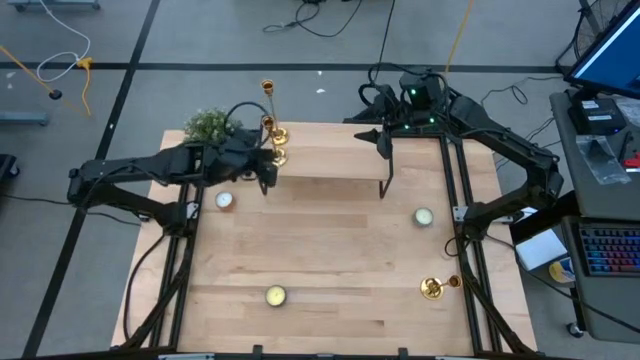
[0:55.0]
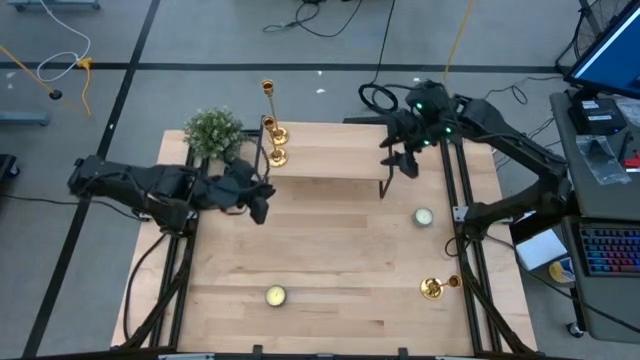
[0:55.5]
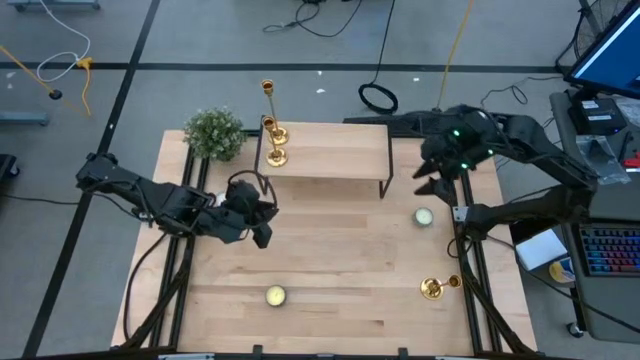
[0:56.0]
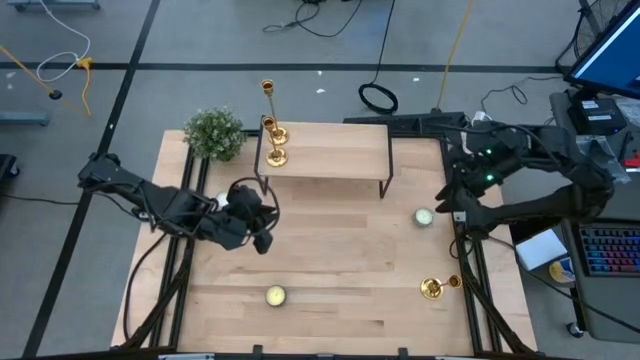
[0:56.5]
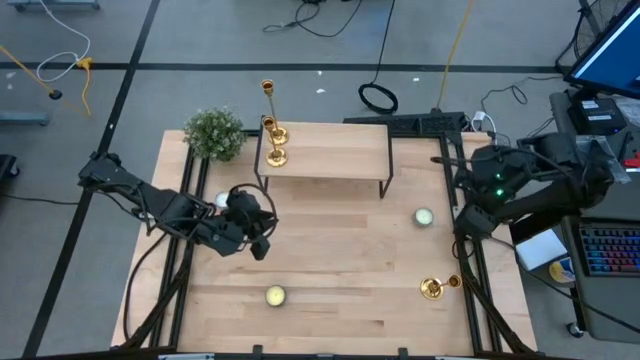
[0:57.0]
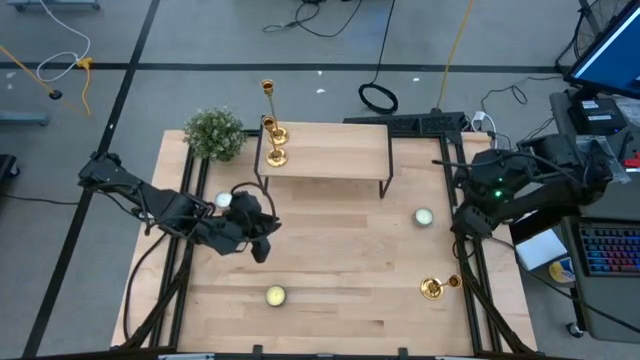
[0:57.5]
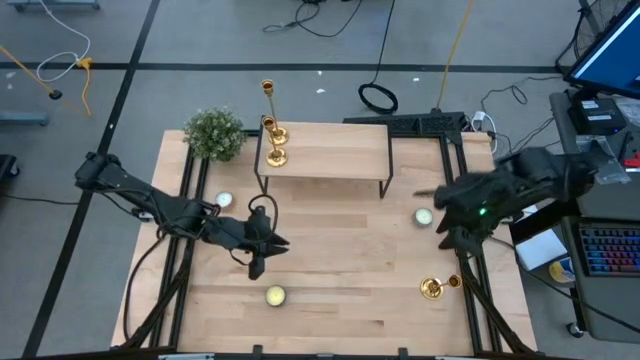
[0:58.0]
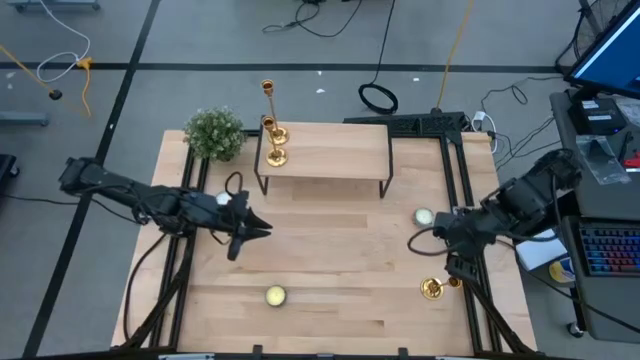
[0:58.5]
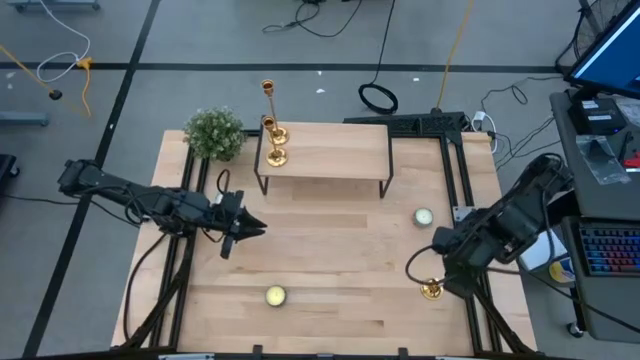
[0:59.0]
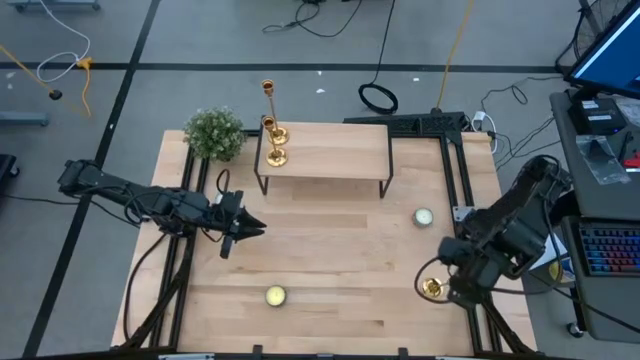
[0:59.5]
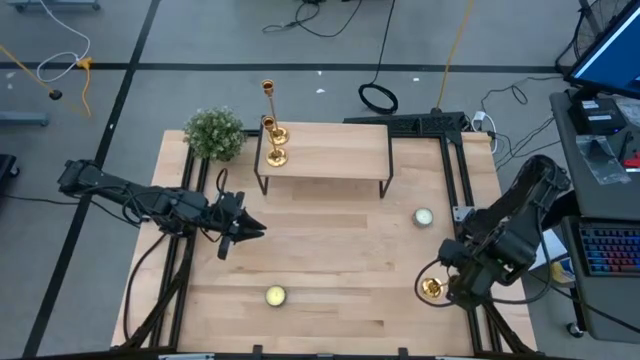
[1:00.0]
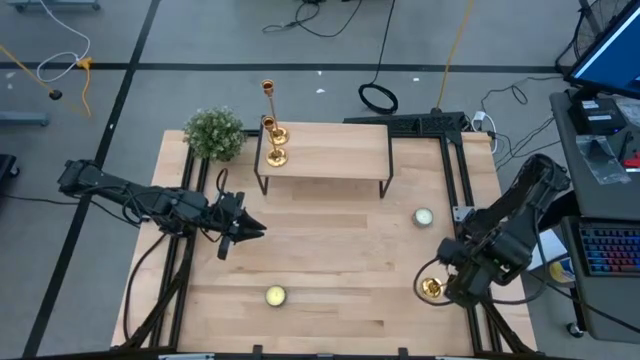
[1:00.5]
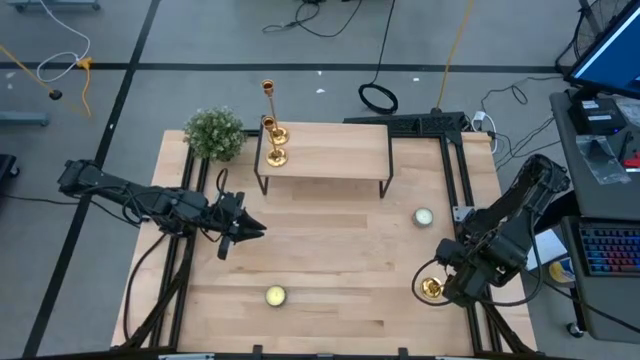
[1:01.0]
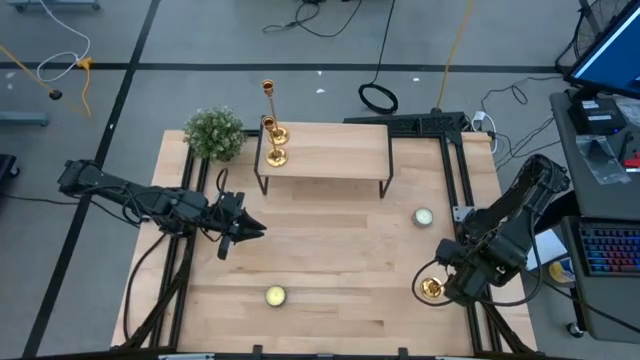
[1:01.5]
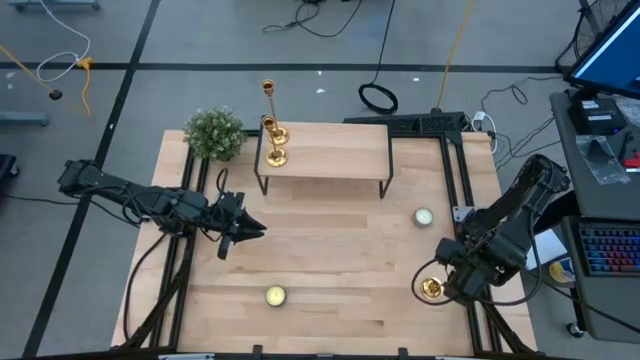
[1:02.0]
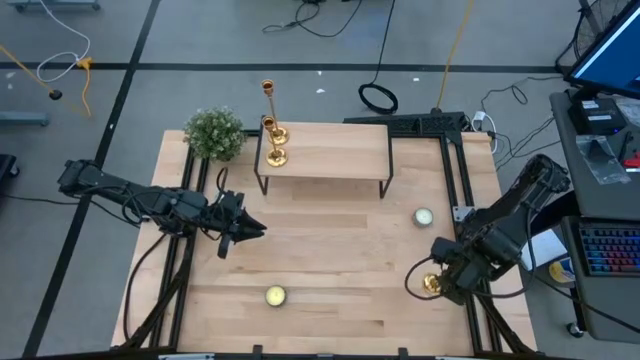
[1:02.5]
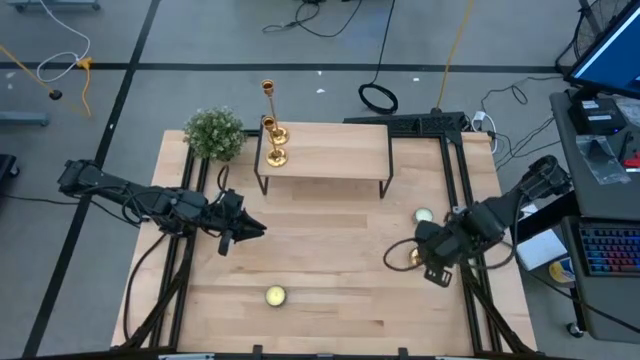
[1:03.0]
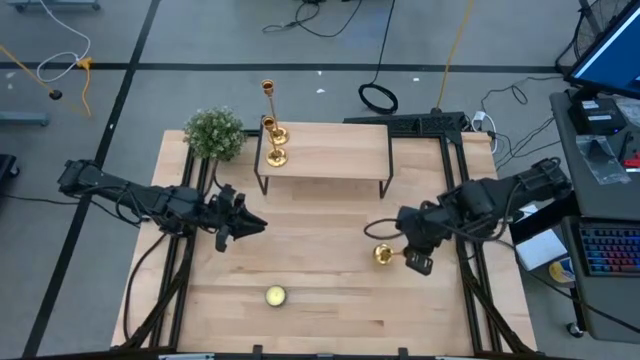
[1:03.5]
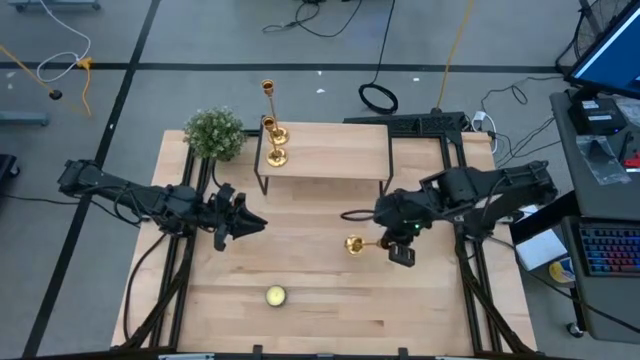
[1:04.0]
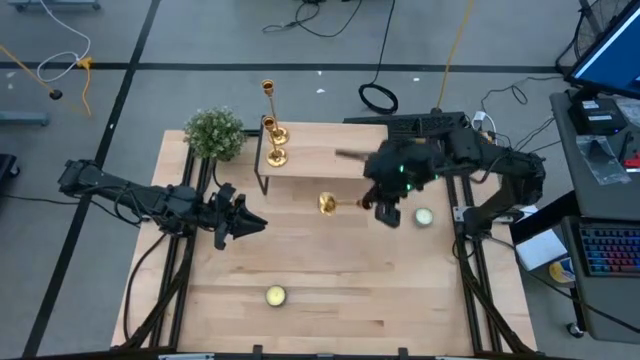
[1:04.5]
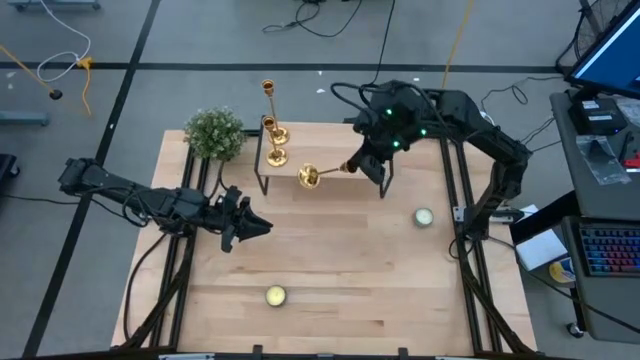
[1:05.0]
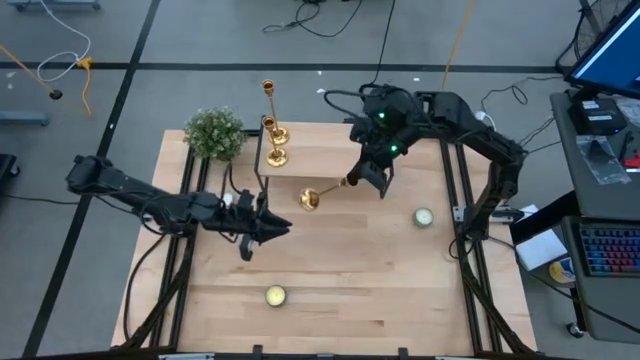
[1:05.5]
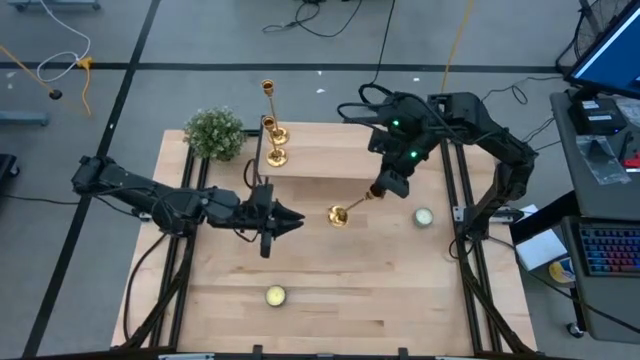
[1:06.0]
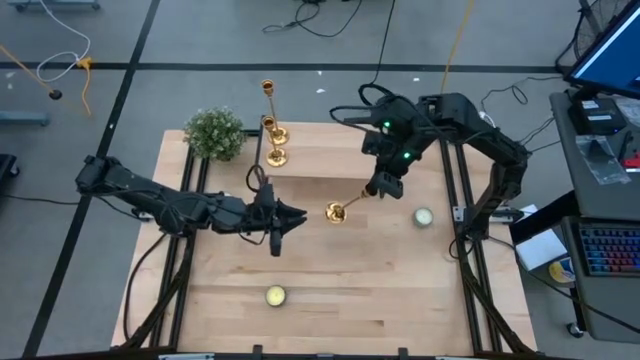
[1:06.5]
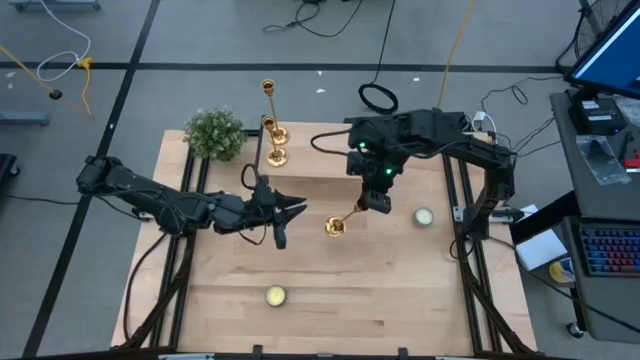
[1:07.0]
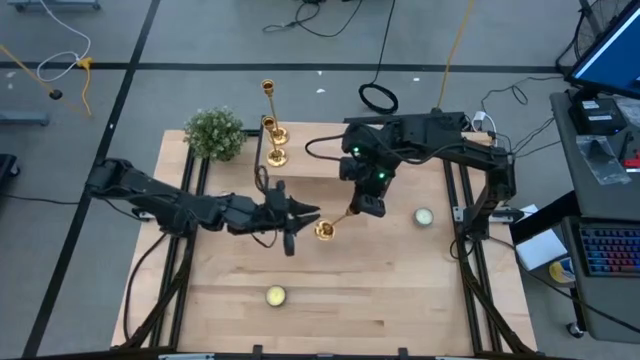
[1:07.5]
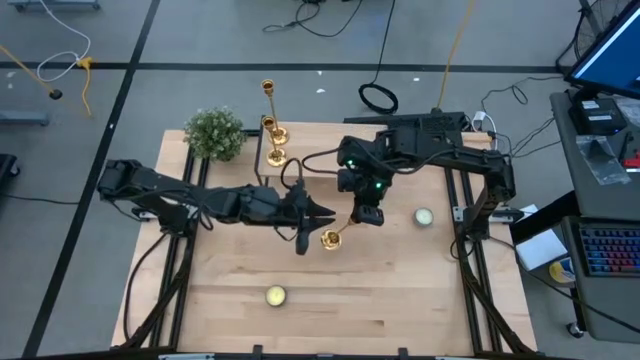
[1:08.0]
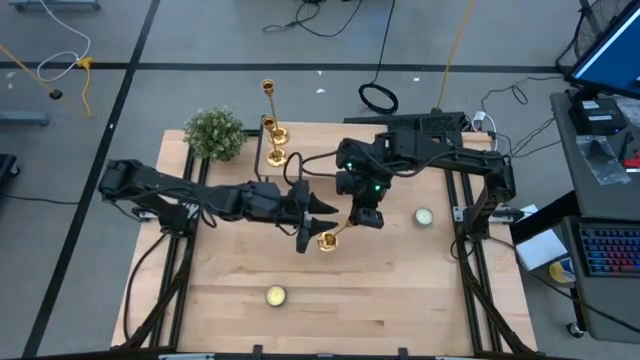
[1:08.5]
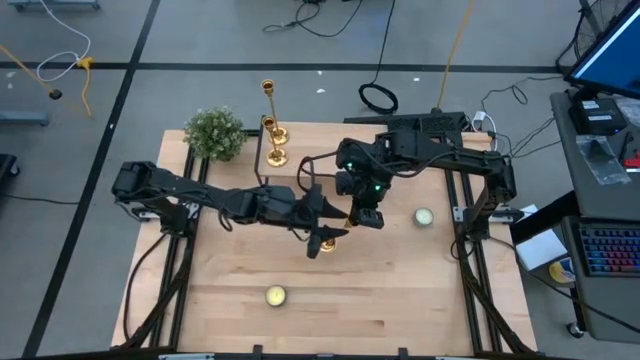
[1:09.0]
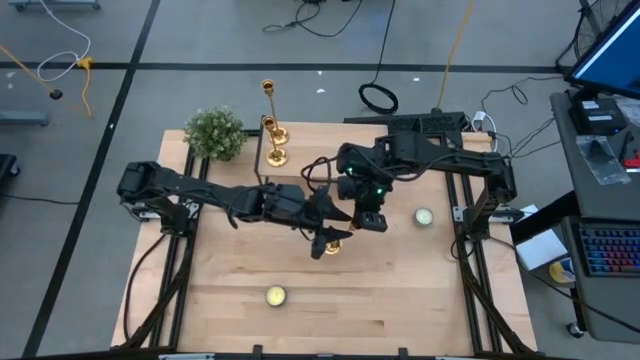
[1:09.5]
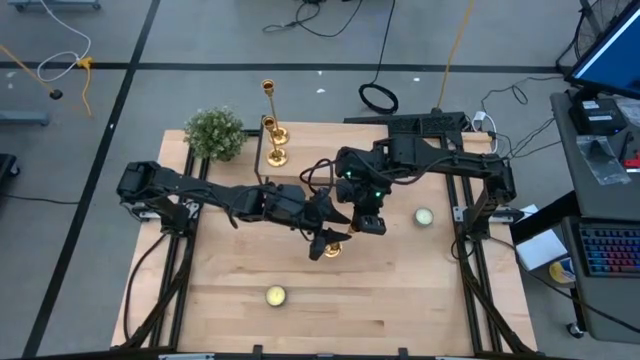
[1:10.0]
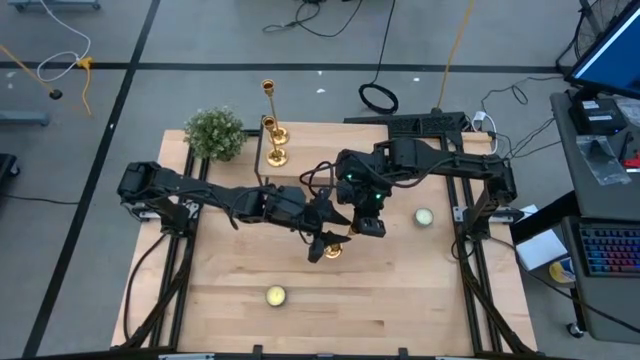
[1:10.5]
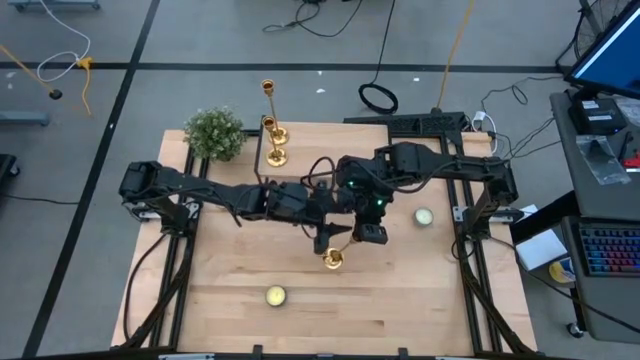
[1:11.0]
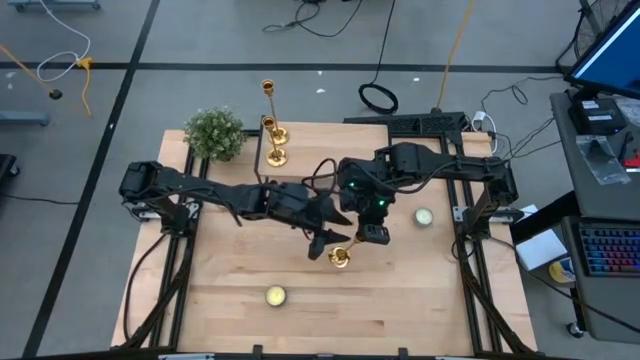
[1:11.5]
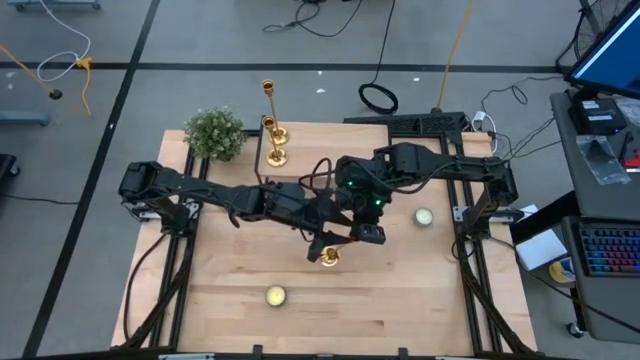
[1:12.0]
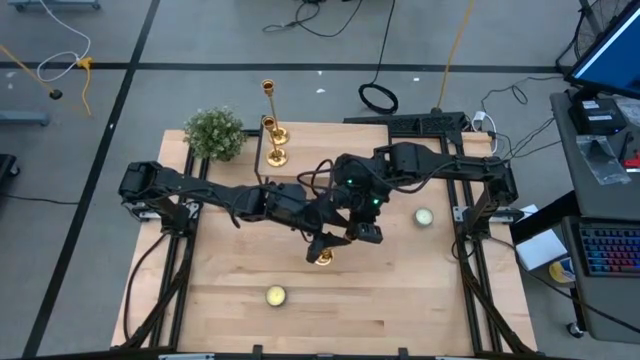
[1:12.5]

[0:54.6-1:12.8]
Task: Pick & Place candle stick holders
Put the gold candle holder on the shelf

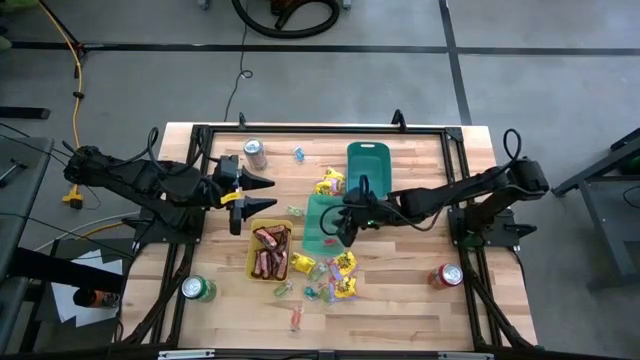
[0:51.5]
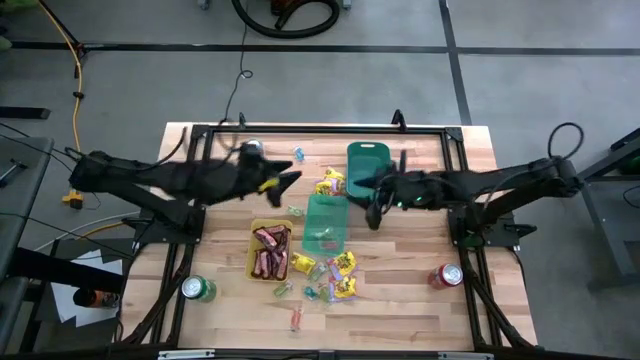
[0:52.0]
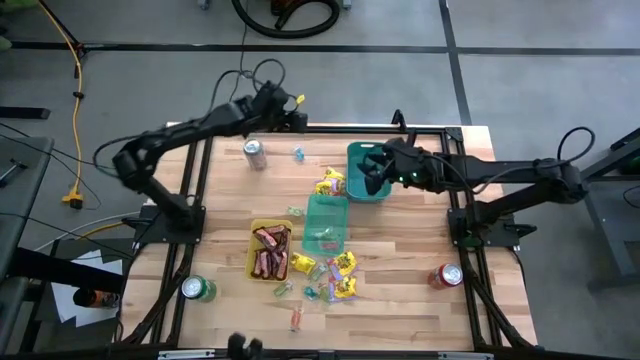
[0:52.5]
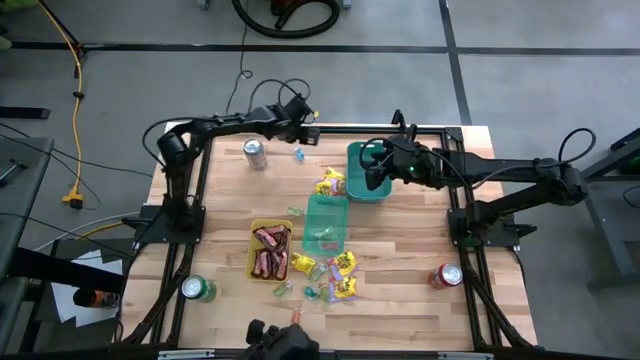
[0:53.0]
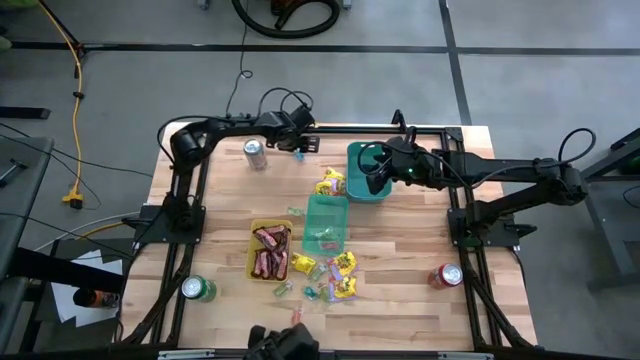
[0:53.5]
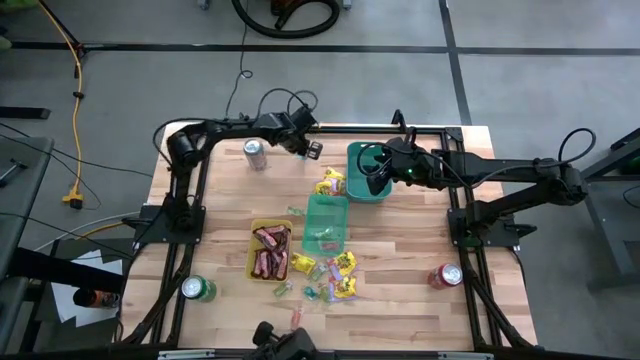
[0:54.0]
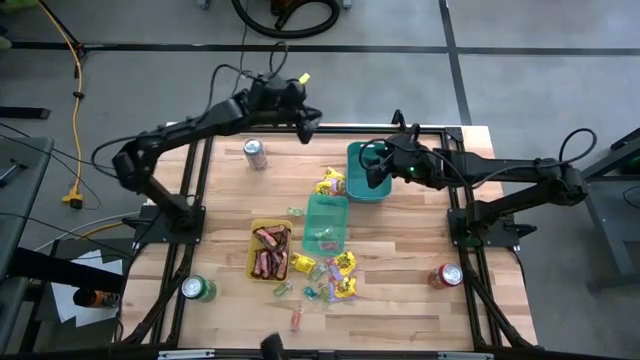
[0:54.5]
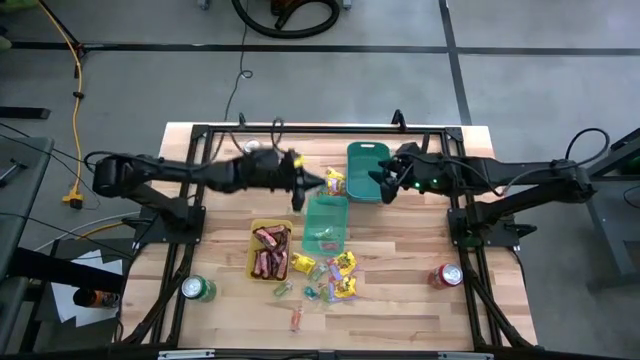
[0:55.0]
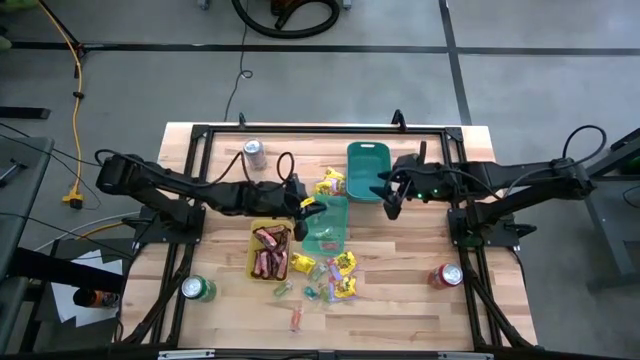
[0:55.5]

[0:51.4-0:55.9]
Task: Sort candy
Put the blue gummy into the light blue bin
